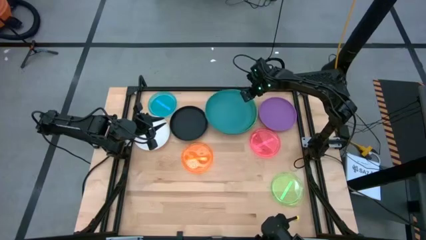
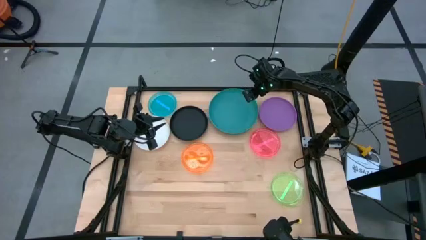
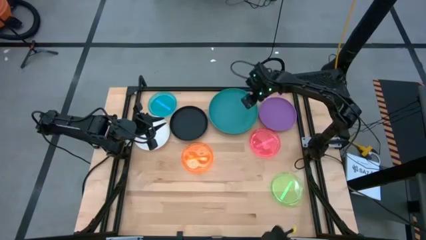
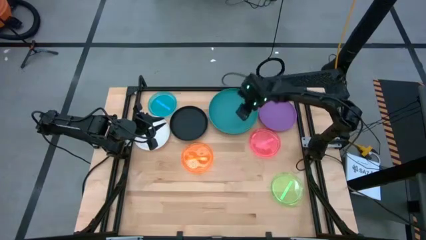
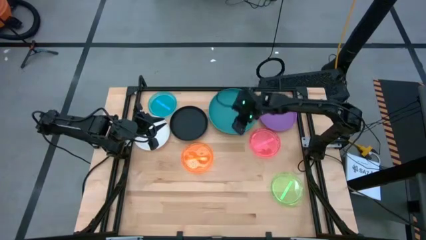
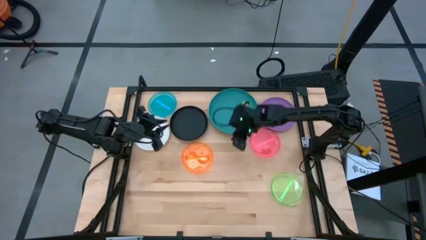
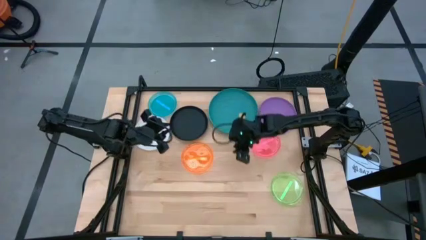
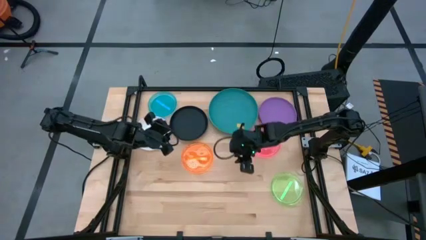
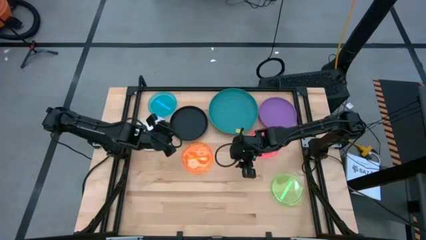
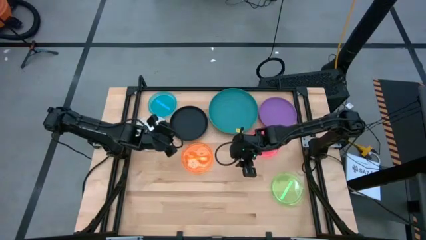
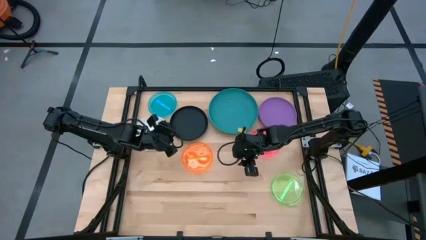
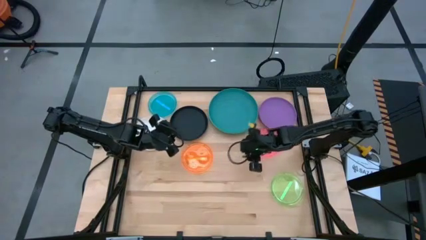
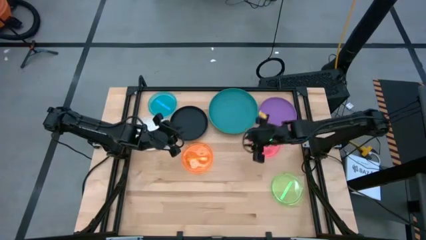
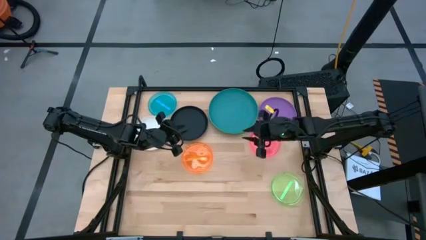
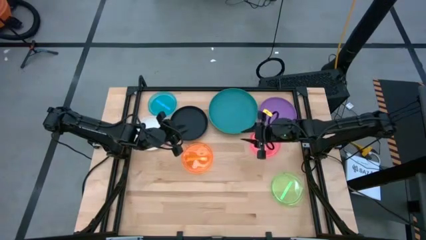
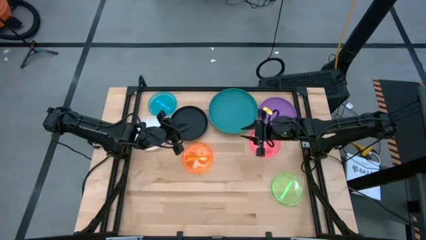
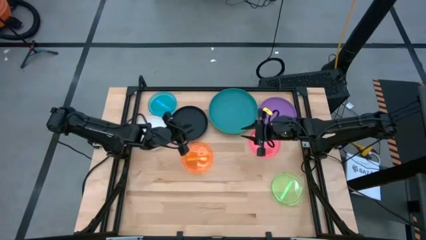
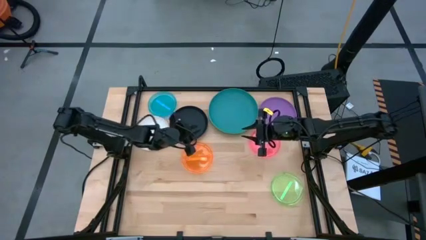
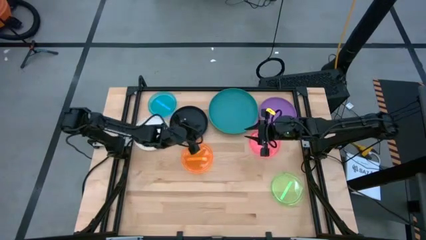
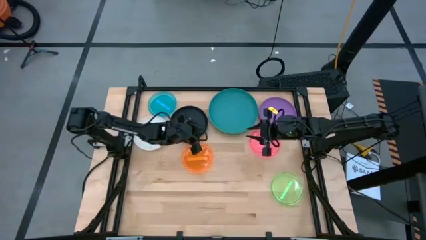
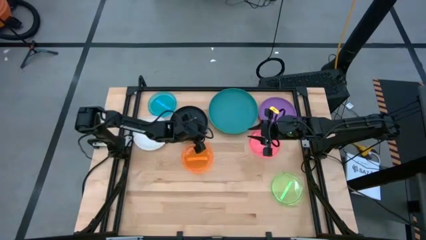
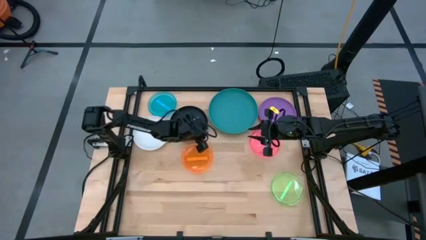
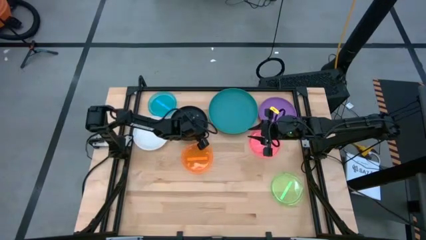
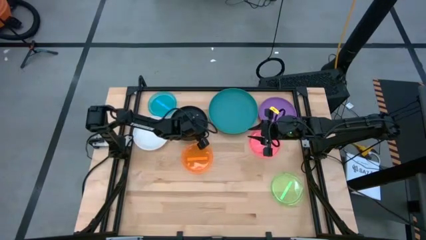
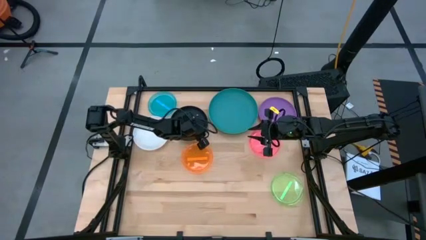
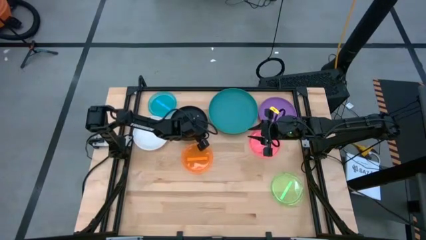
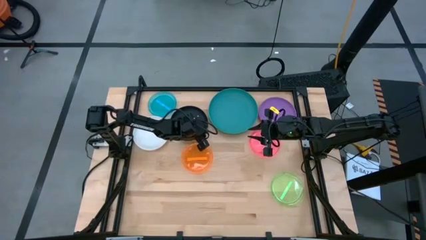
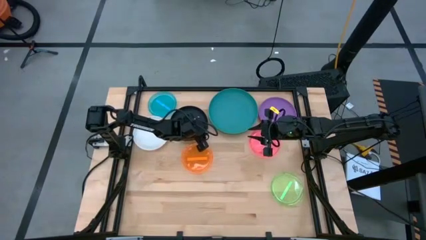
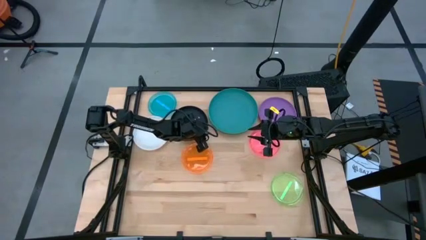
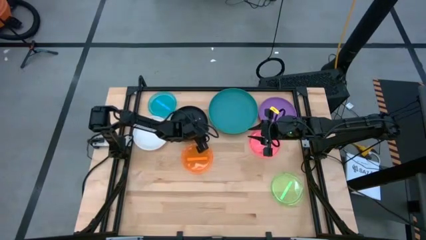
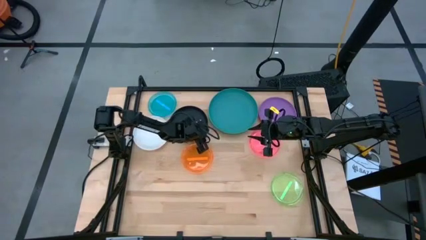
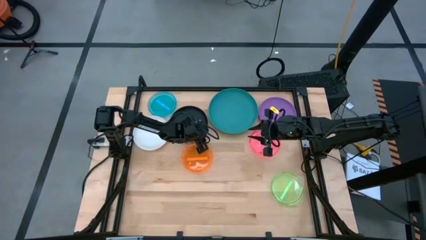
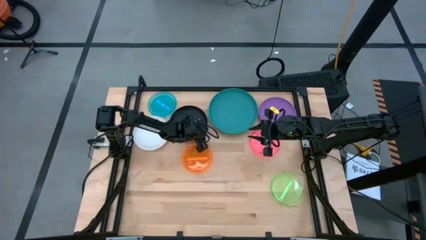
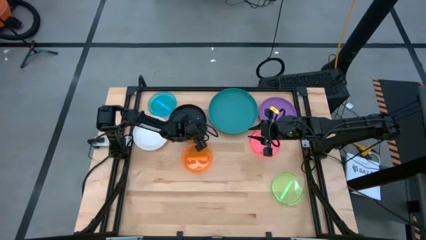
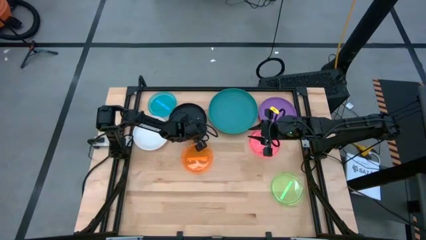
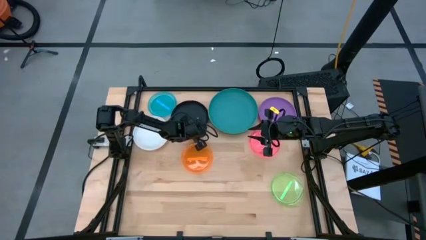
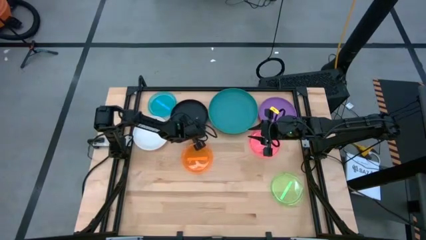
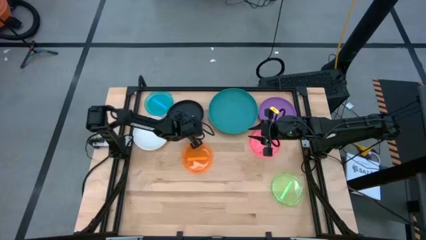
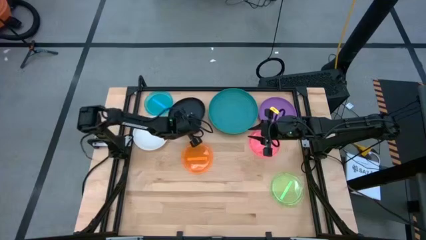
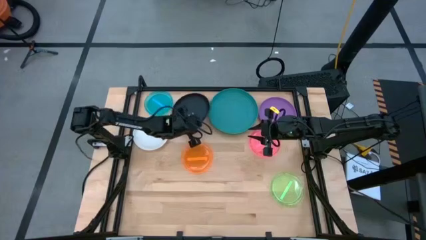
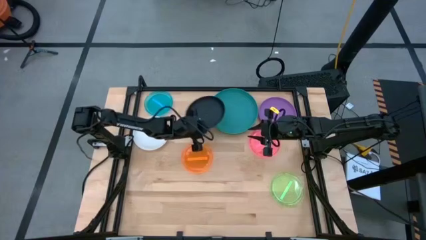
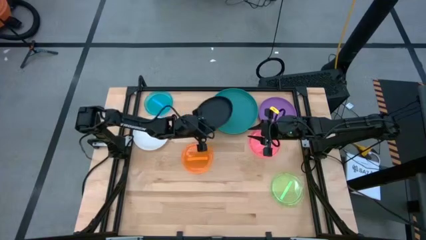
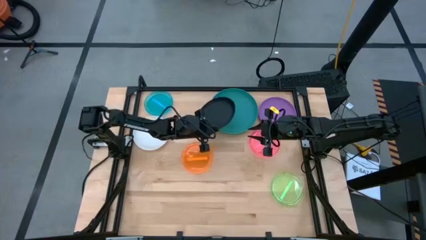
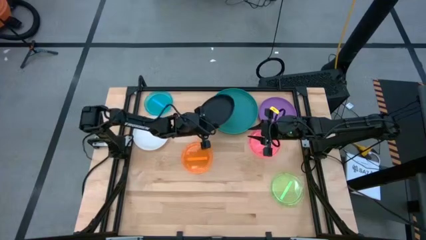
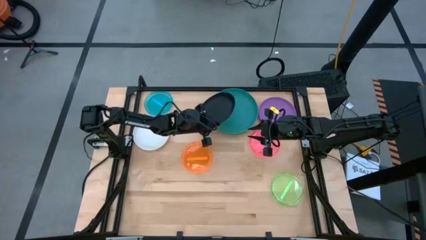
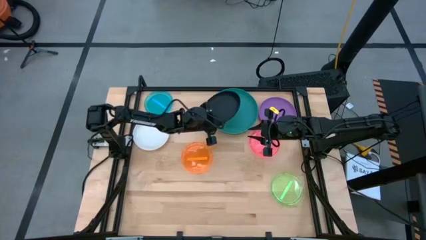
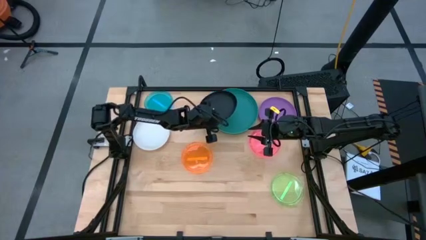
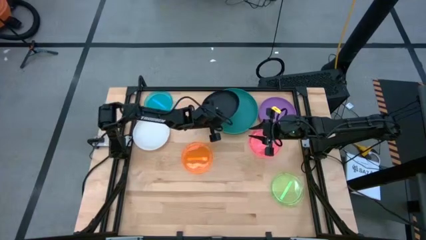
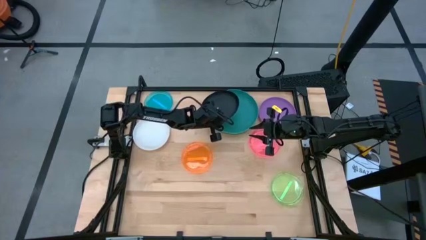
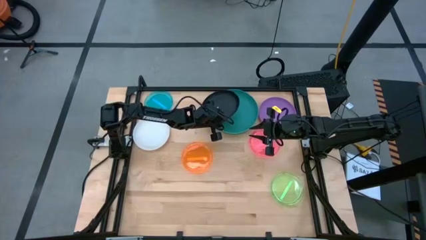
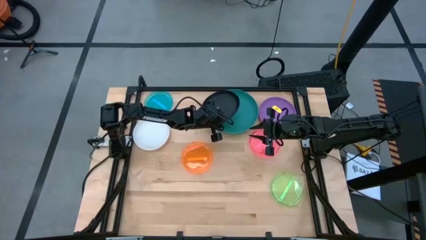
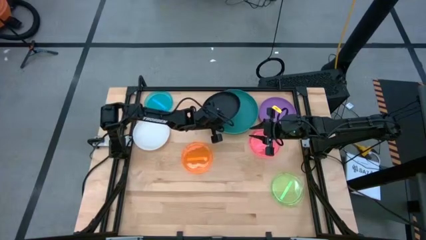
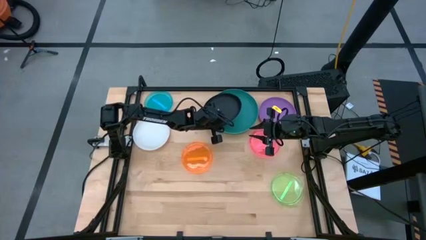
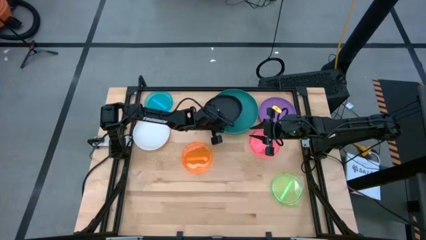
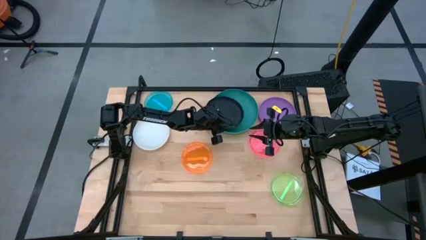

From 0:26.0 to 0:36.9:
Task: Stack plastic plates
Stack the black plate on top of the blue plate

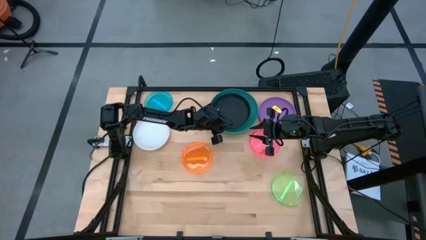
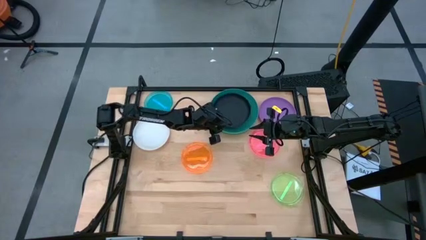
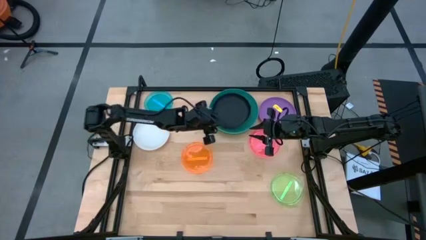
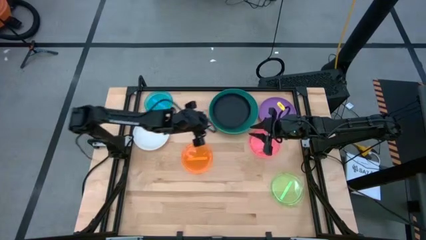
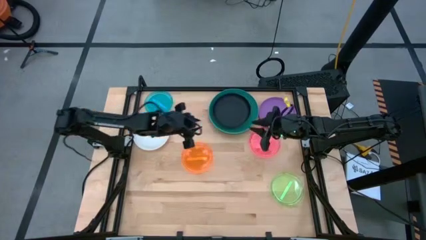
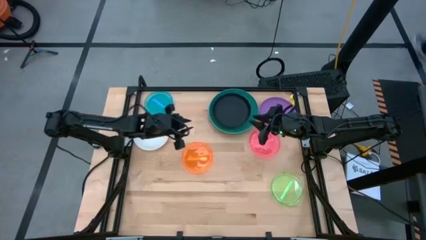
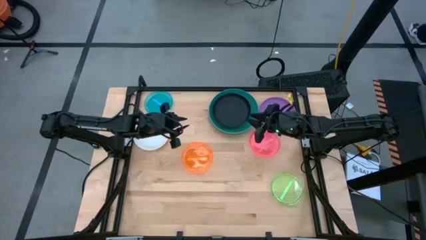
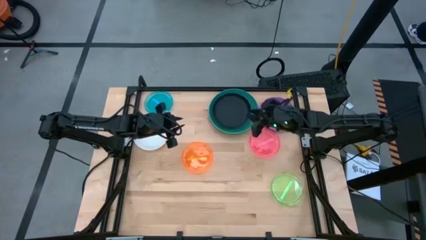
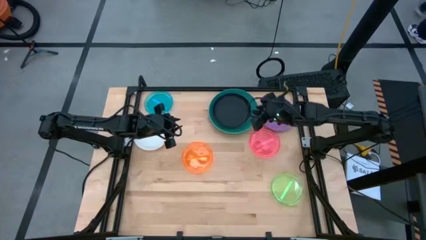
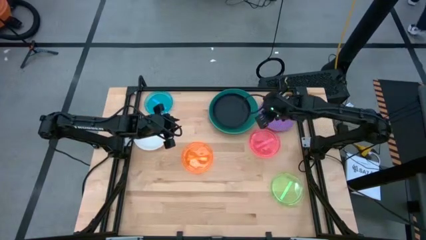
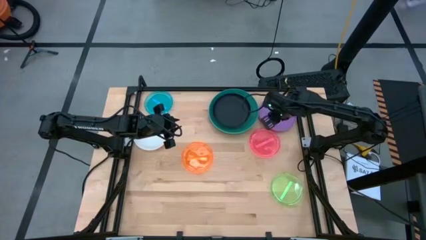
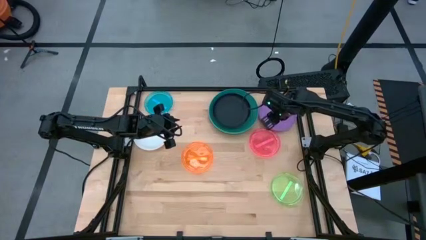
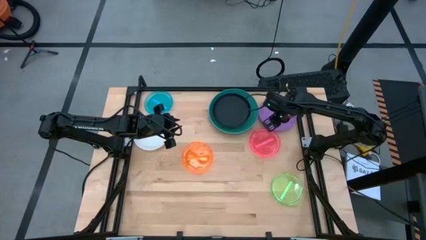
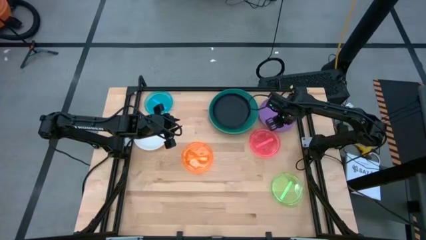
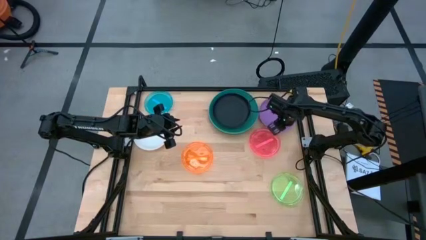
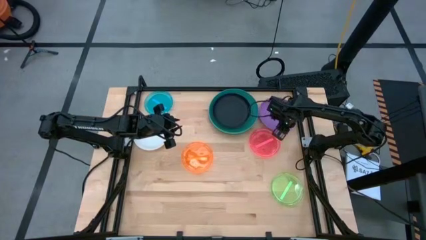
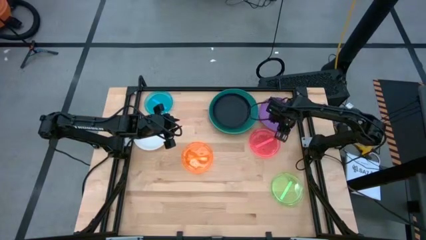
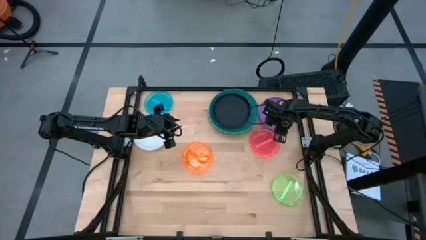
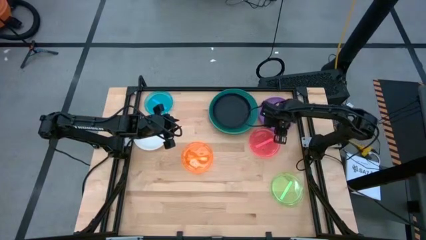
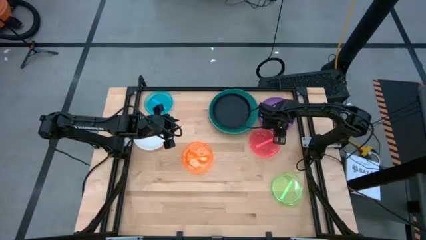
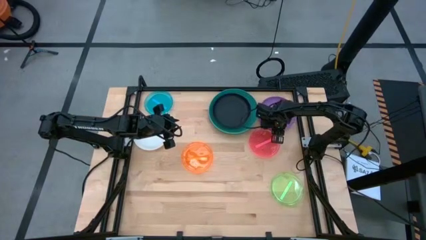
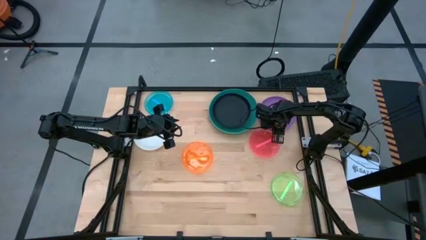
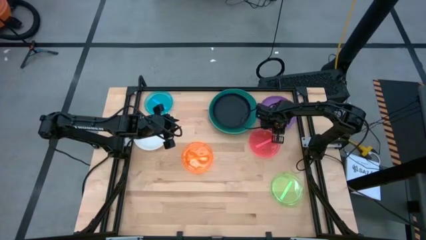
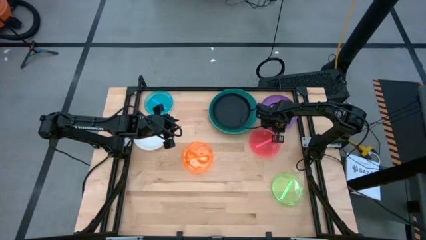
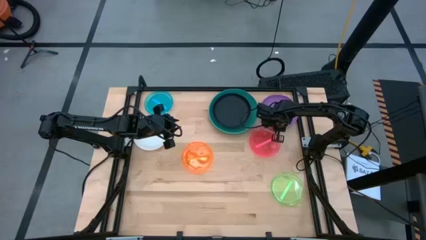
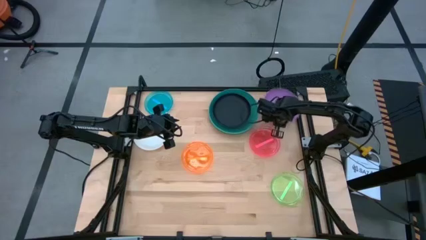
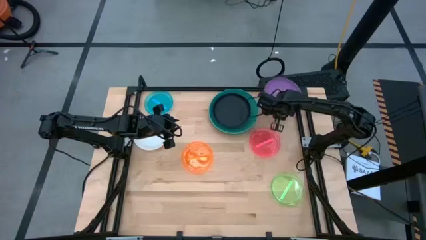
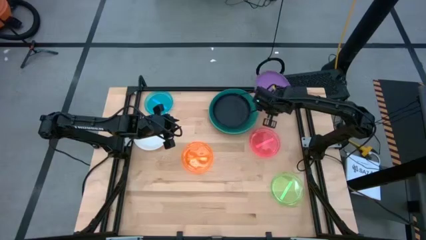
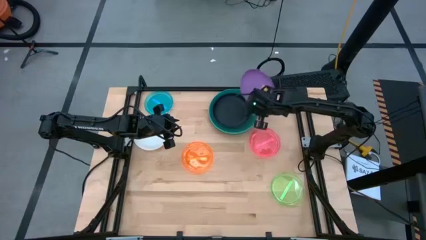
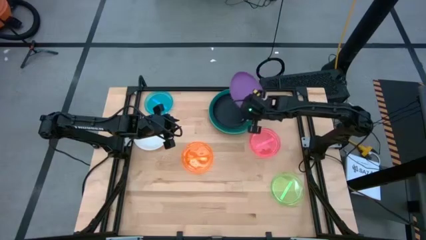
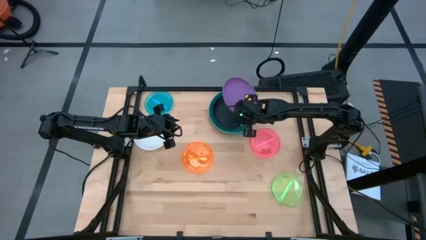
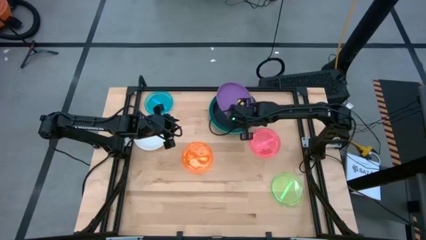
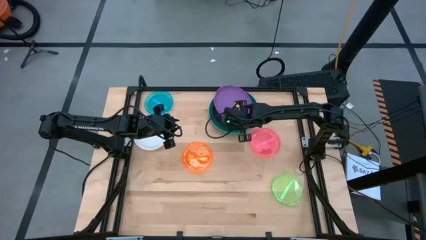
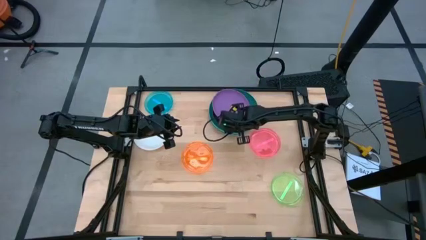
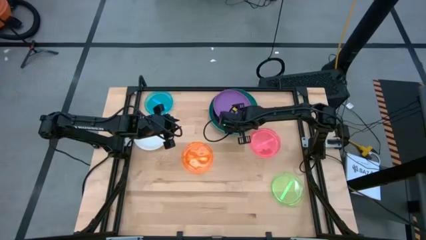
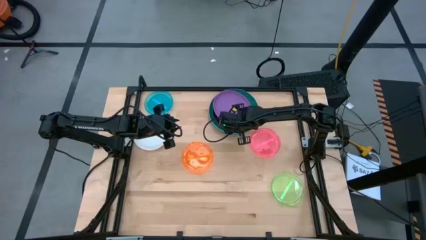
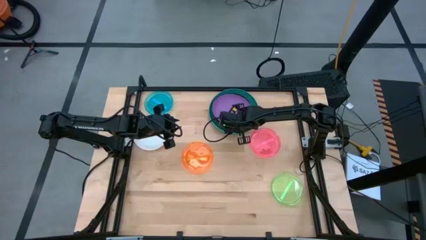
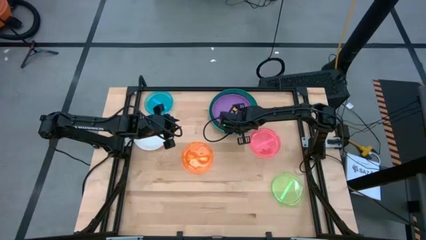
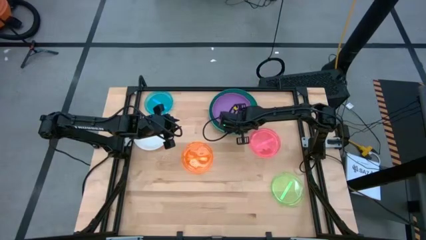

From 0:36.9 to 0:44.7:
Stack the purple plate on top of the black plate
